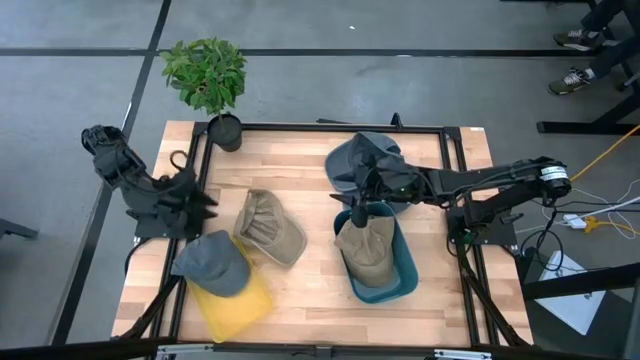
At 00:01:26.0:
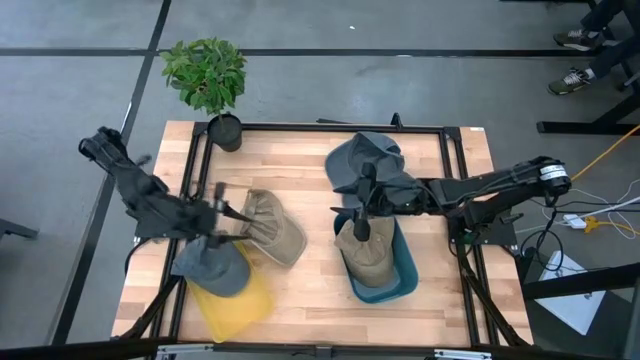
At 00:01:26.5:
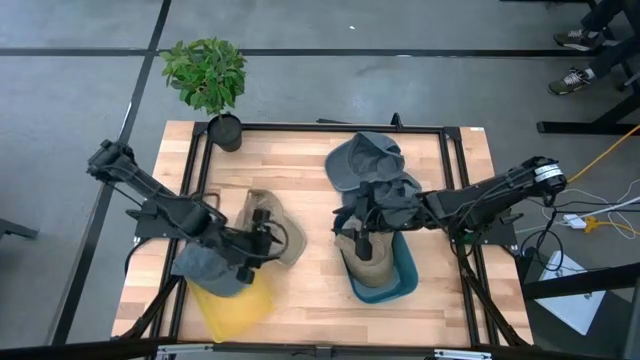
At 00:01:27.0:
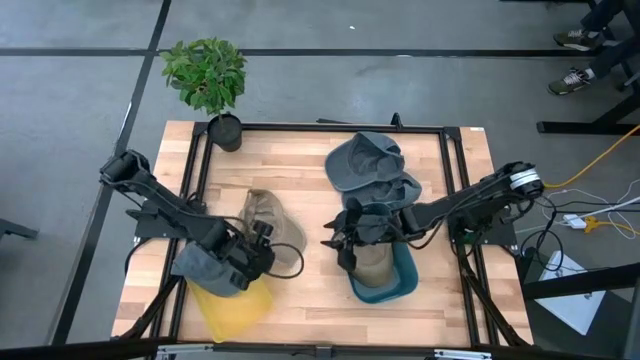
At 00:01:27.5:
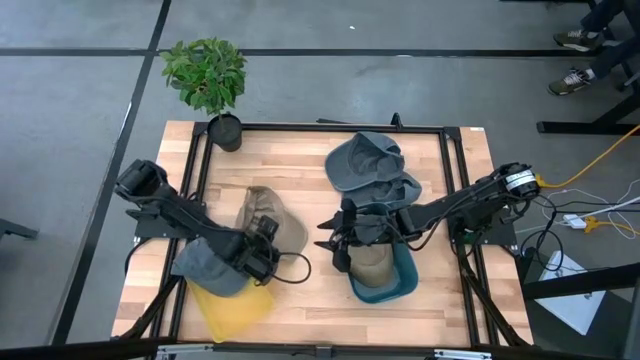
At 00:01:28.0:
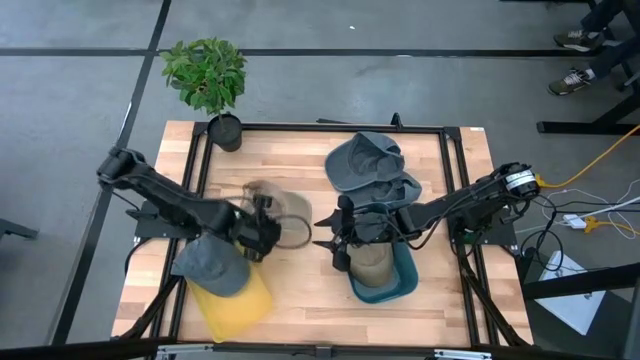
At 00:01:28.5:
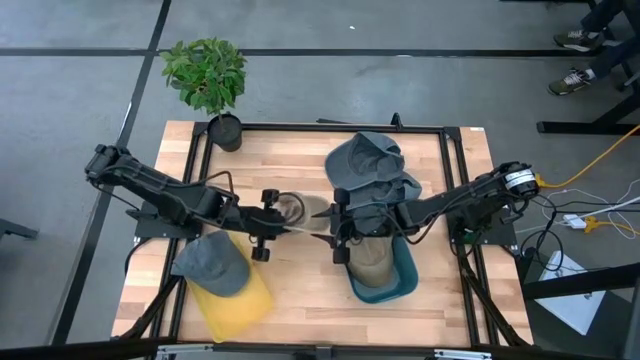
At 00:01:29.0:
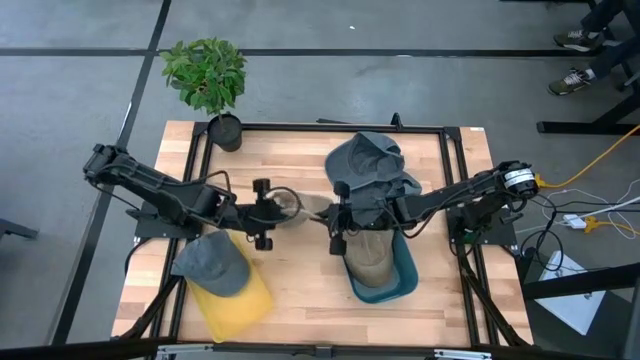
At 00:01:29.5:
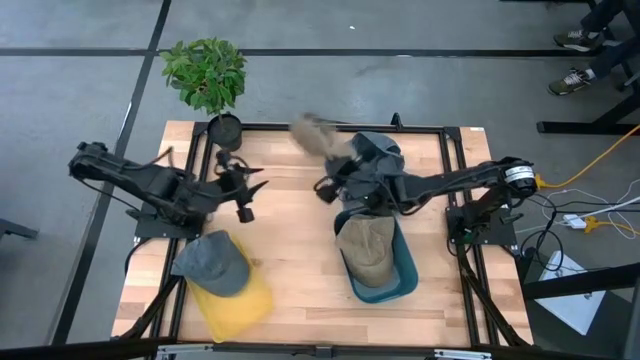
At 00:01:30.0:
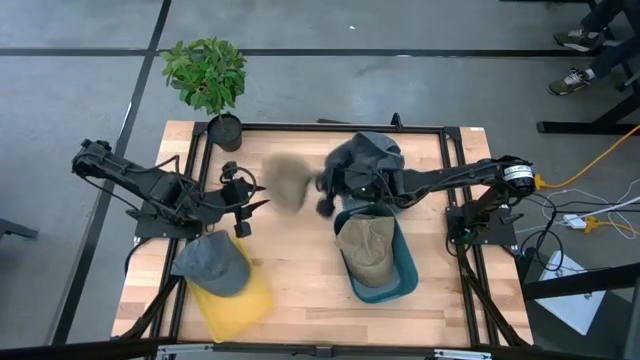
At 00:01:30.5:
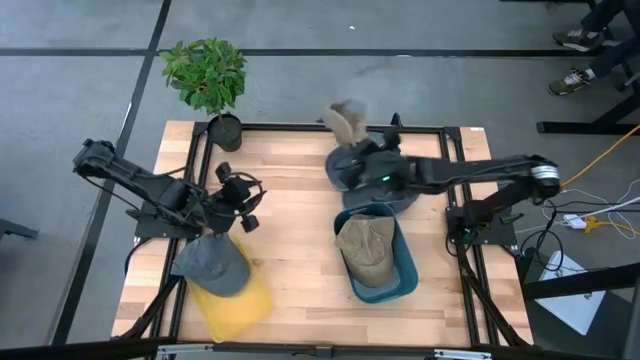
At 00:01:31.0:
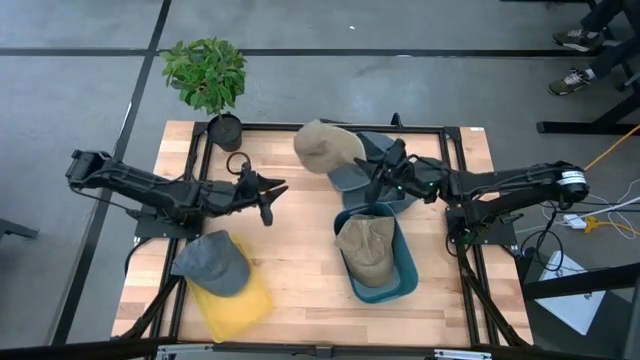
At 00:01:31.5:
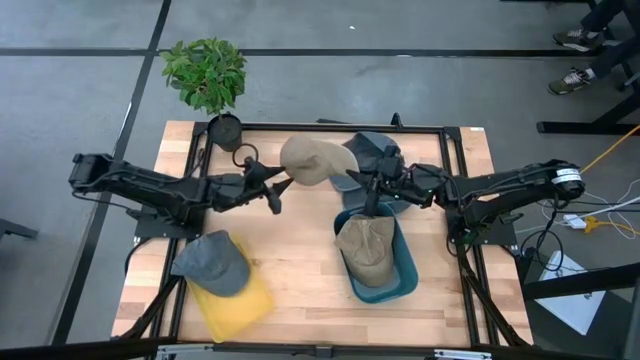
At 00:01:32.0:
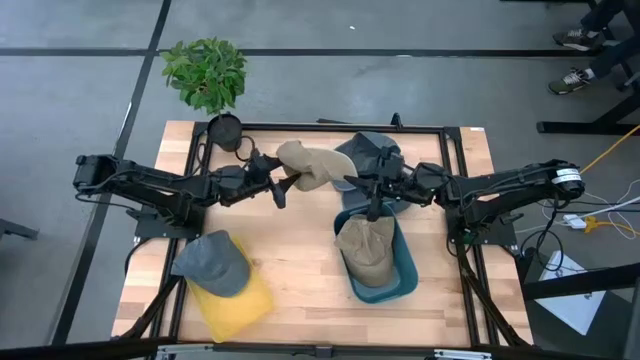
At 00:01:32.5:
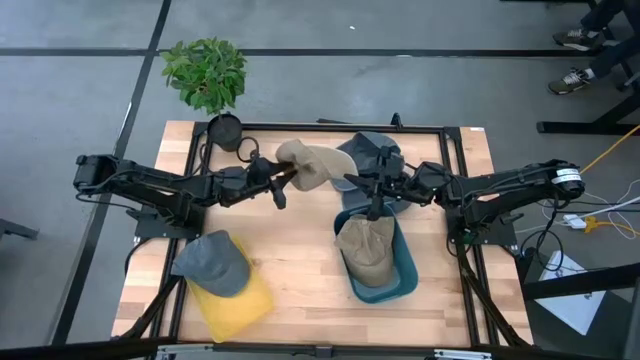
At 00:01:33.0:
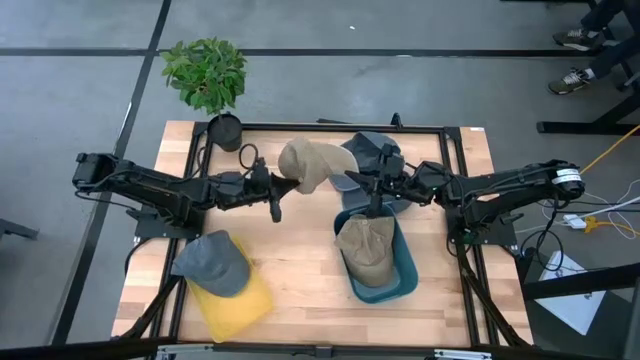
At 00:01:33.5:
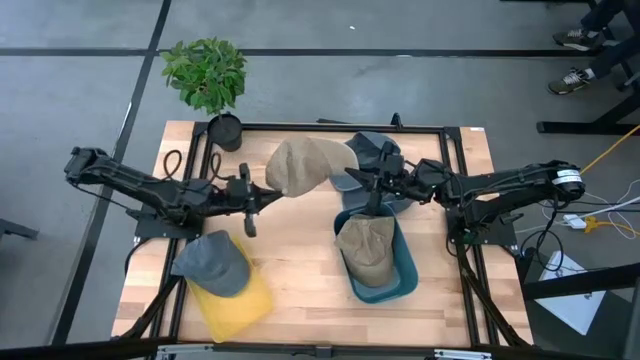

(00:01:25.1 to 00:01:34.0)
Task: Pick & Place hat
Put the brown cap into the blue bin

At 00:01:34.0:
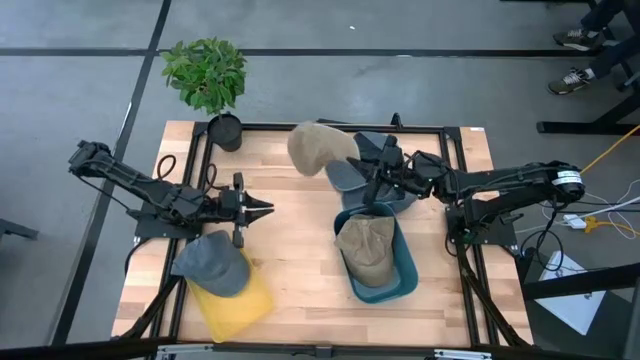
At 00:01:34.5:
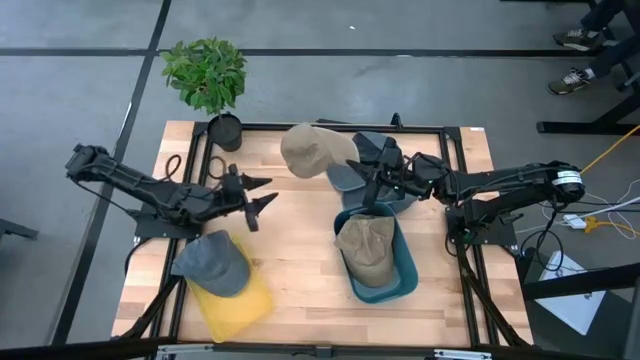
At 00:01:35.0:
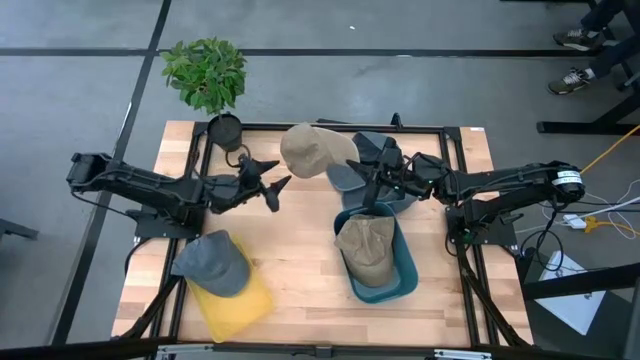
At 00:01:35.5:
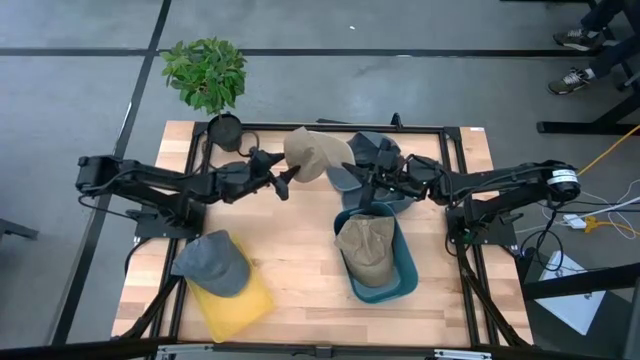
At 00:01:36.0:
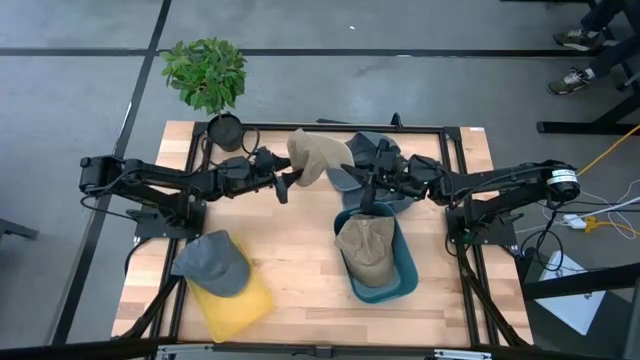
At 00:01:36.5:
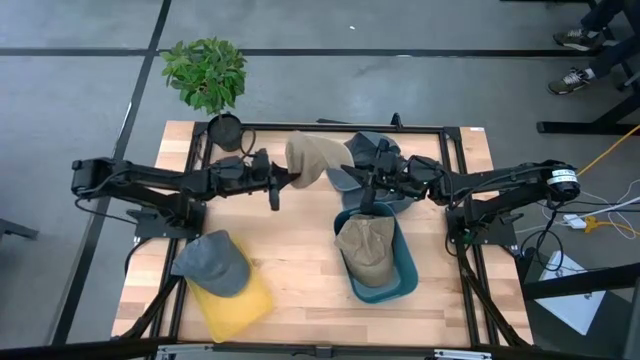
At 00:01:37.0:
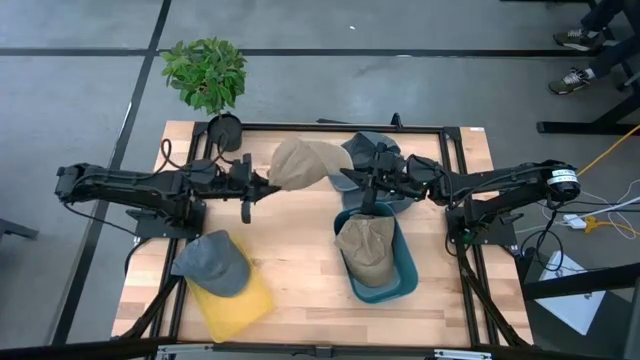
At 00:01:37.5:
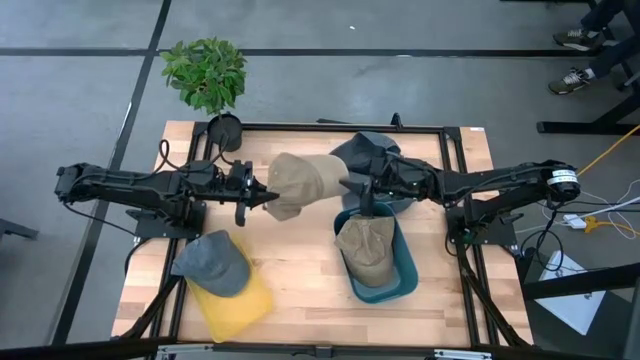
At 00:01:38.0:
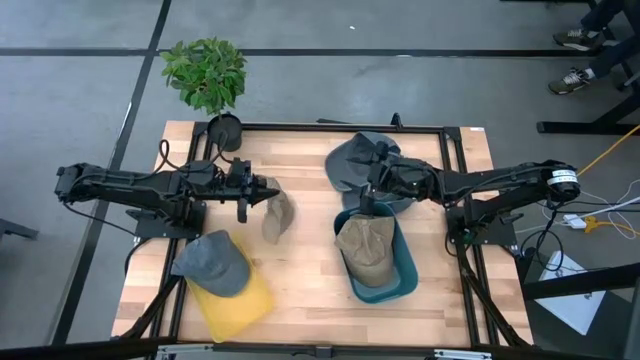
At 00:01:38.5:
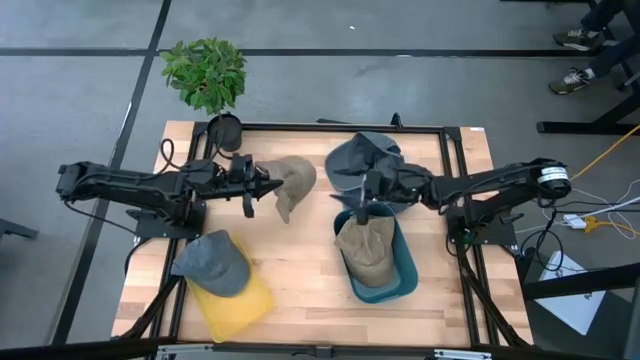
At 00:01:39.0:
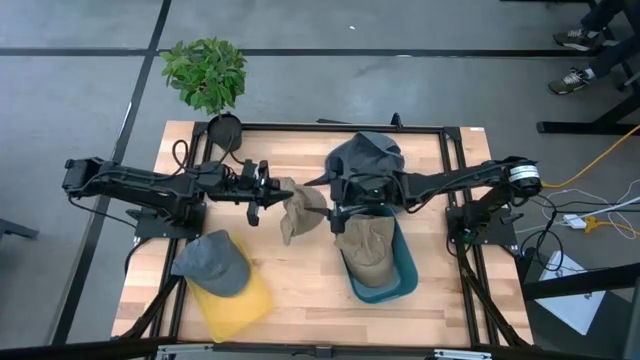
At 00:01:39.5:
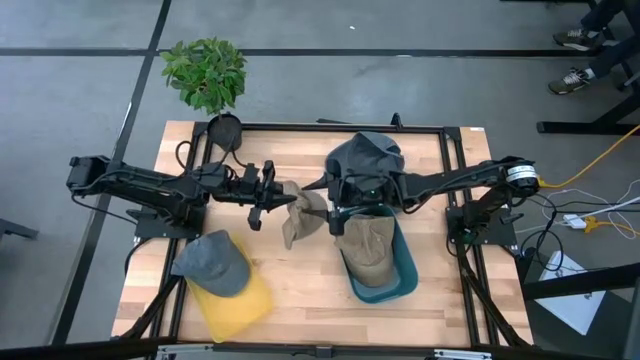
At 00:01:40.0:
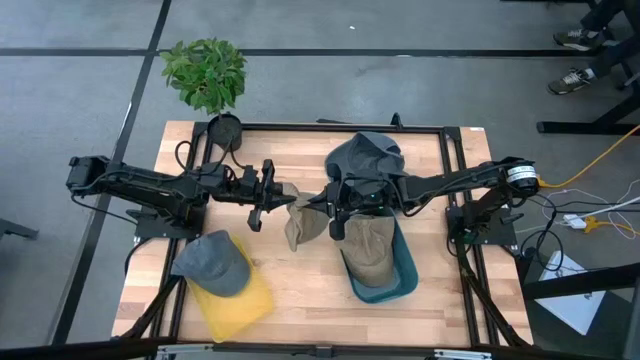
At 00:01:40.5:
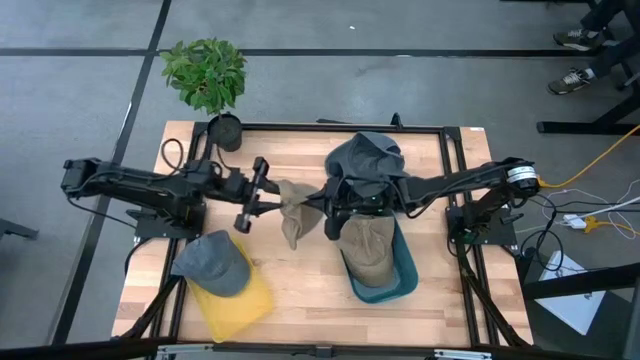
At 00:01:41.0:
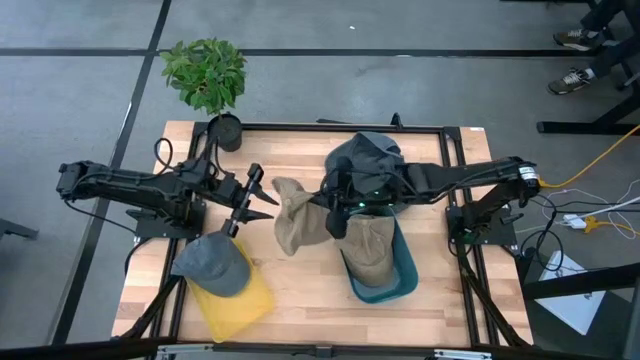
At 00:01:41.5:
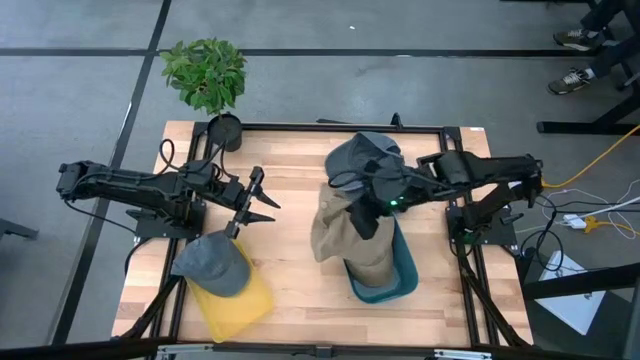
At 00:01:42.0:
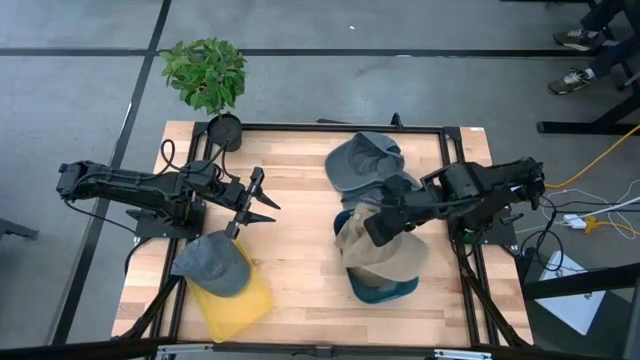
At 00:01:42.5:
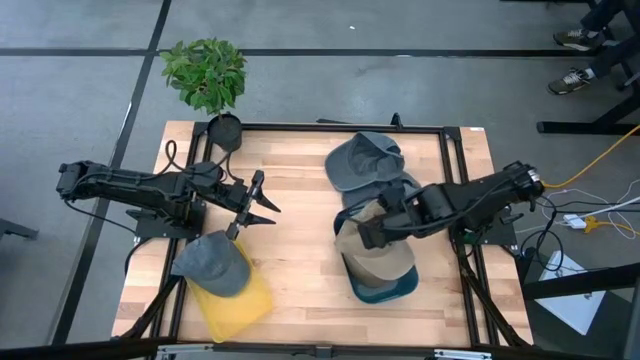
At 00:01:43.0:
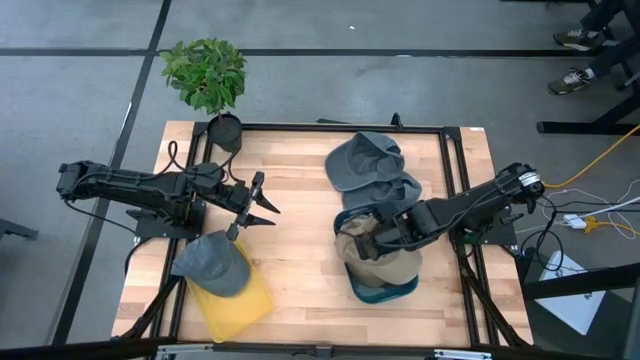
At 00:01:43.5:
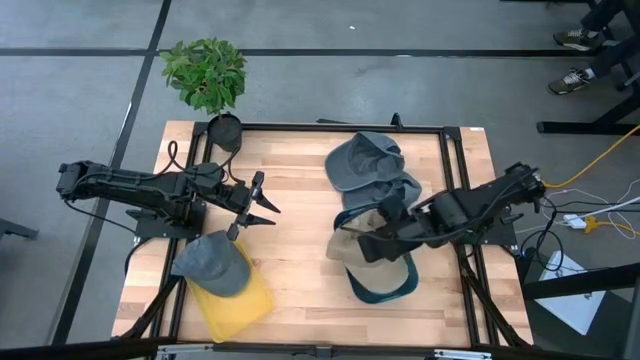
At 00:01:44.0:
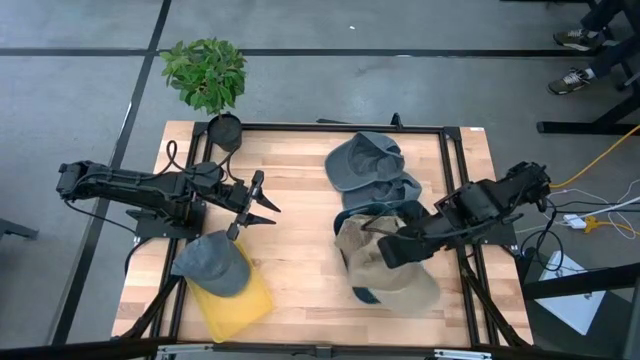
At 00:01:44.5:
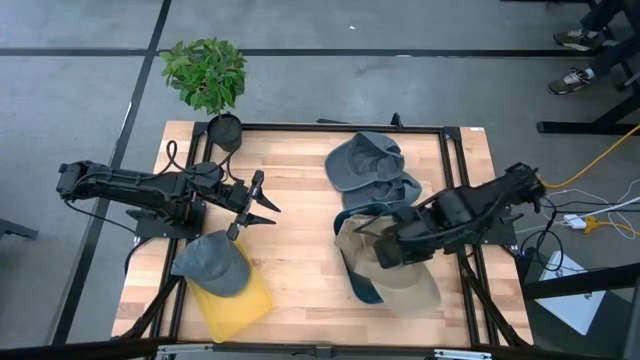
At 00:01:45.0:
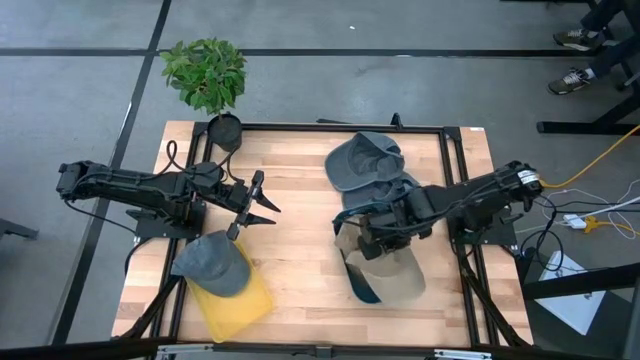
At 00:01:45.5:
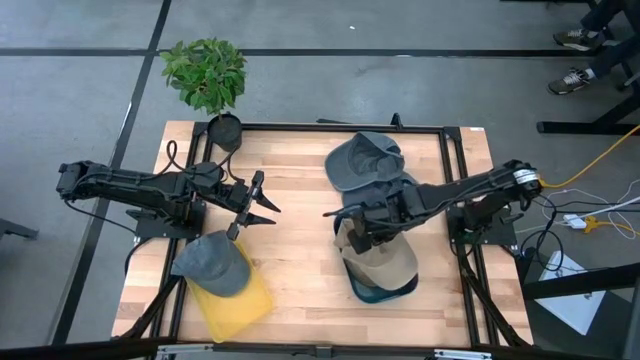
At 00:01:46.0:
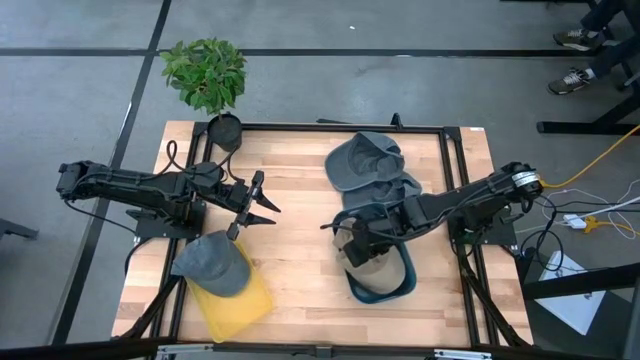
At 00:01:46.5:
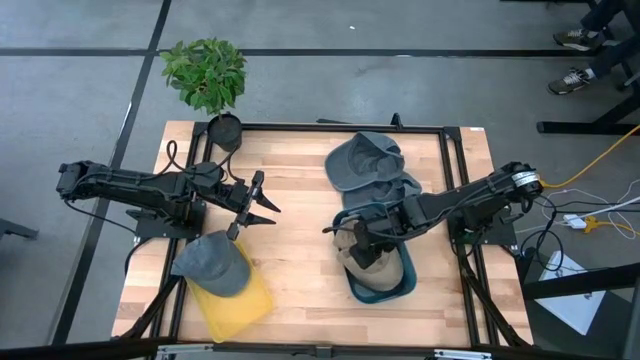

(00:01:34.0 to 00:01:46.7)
Put the brown cap into the blue bin
